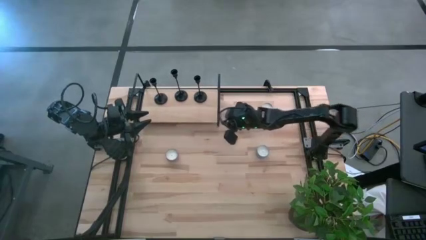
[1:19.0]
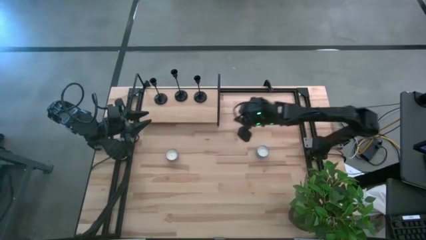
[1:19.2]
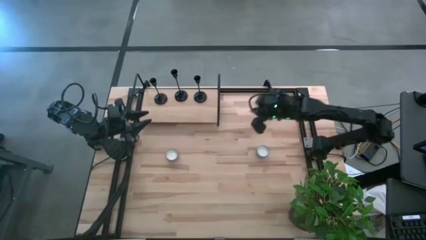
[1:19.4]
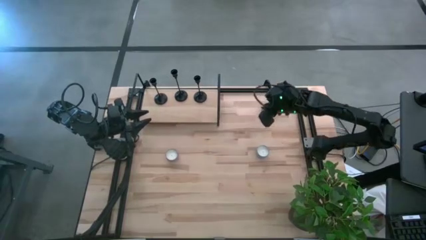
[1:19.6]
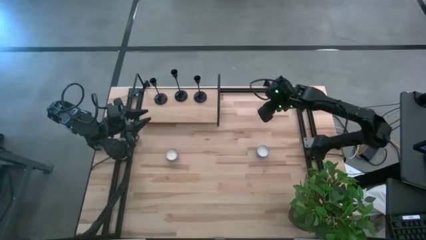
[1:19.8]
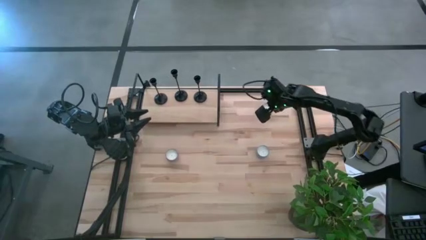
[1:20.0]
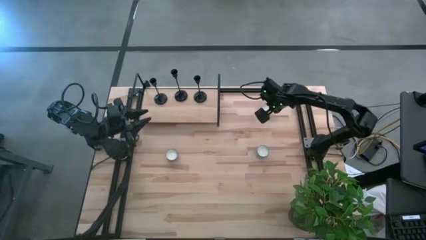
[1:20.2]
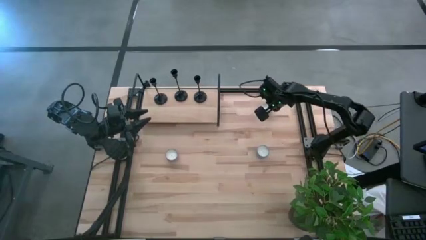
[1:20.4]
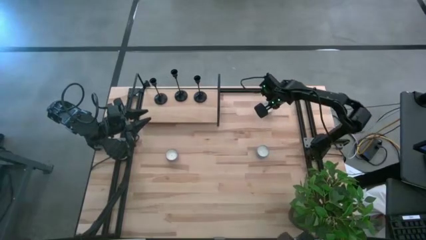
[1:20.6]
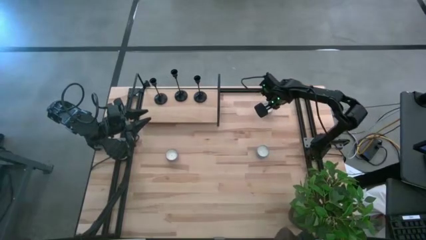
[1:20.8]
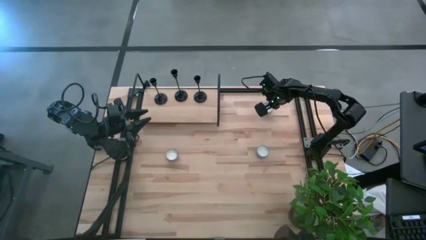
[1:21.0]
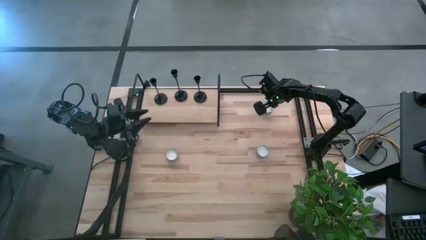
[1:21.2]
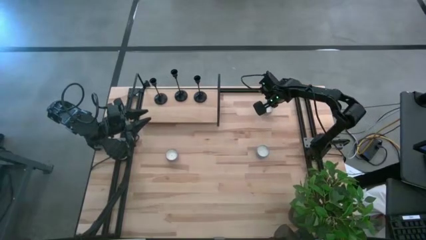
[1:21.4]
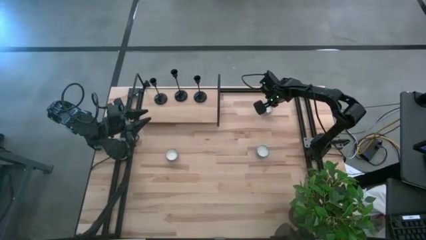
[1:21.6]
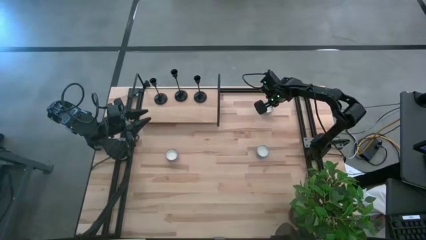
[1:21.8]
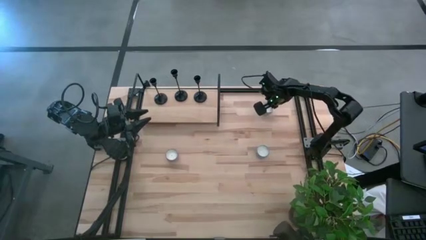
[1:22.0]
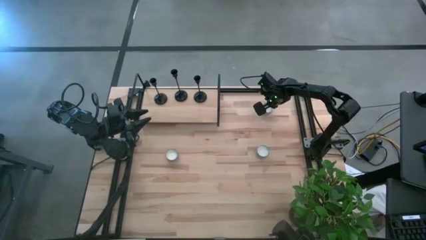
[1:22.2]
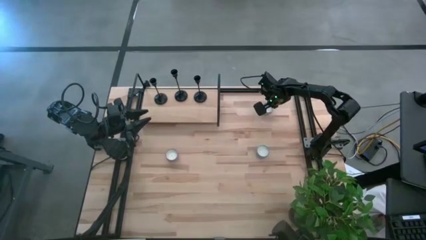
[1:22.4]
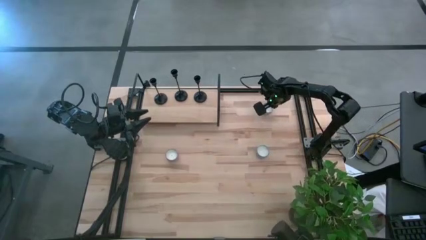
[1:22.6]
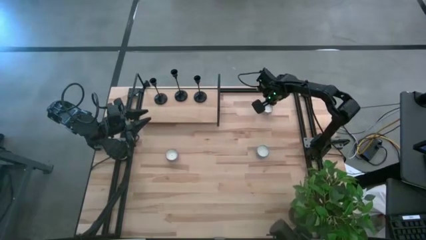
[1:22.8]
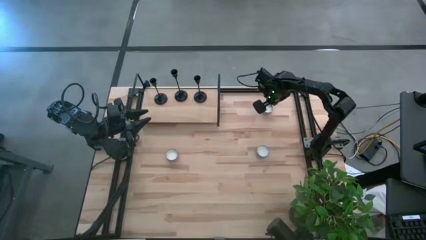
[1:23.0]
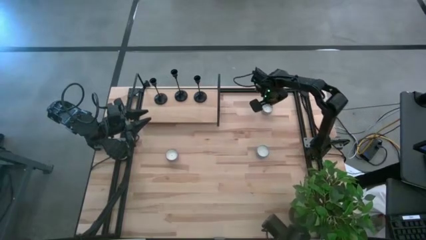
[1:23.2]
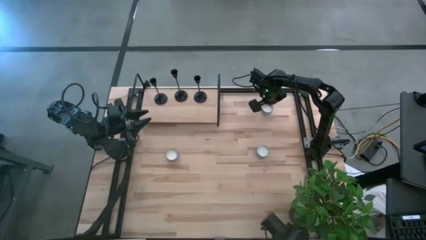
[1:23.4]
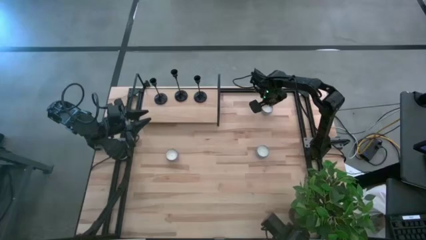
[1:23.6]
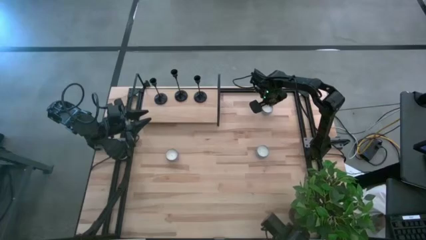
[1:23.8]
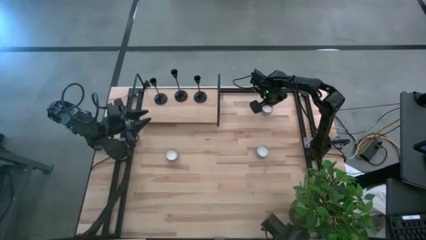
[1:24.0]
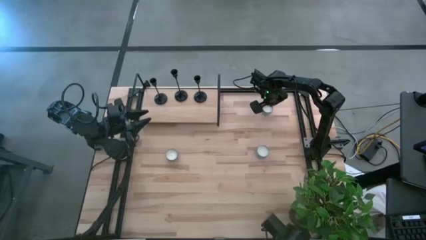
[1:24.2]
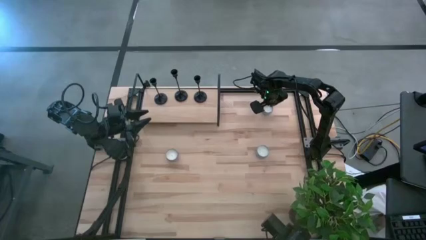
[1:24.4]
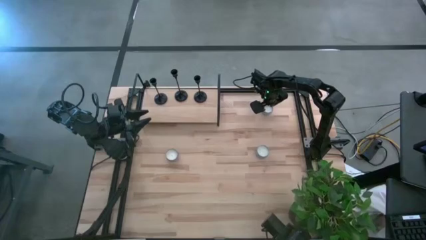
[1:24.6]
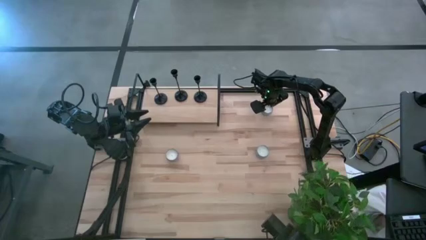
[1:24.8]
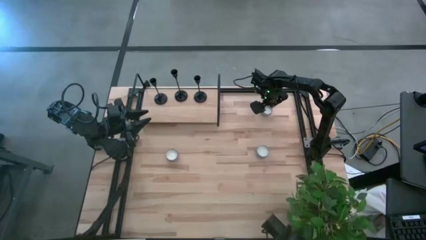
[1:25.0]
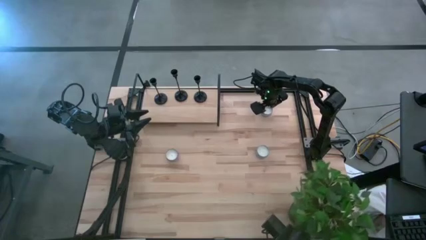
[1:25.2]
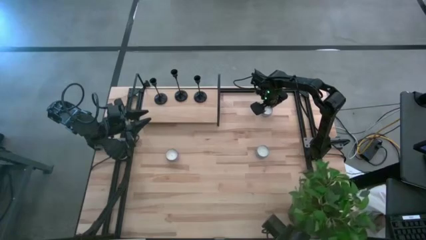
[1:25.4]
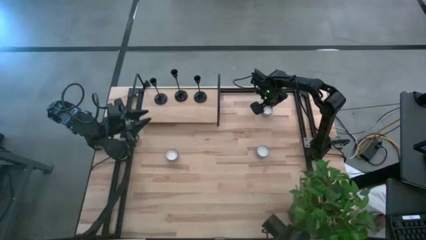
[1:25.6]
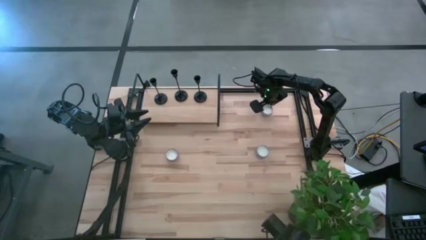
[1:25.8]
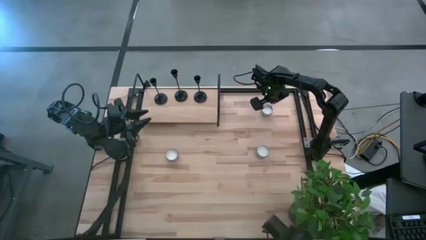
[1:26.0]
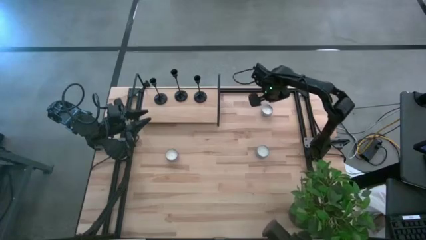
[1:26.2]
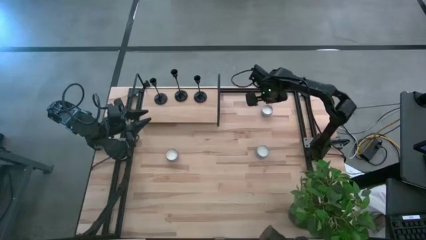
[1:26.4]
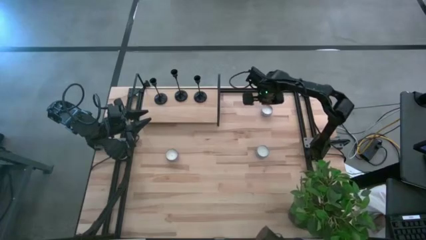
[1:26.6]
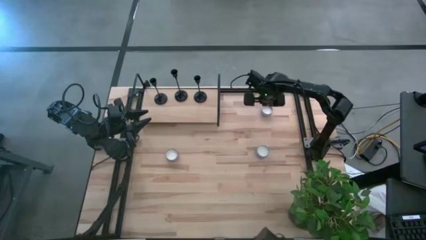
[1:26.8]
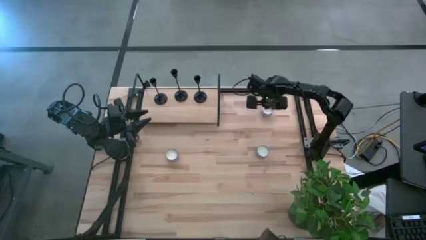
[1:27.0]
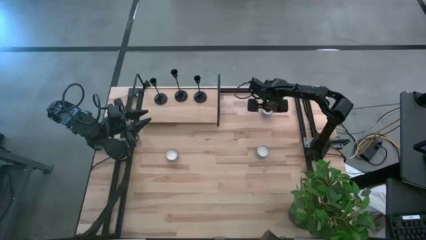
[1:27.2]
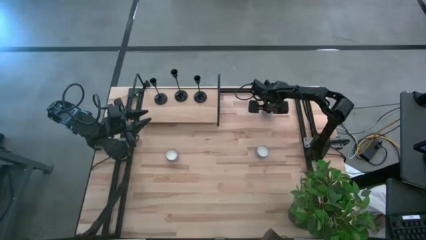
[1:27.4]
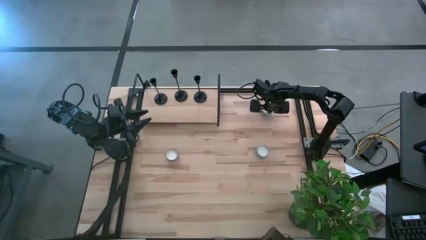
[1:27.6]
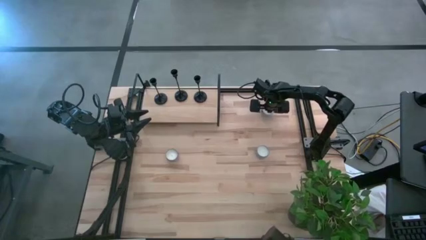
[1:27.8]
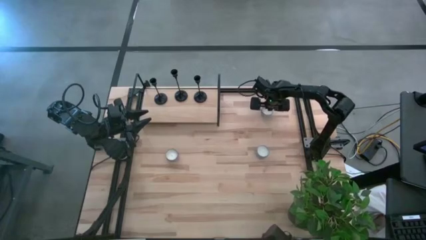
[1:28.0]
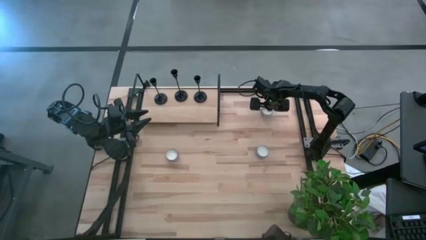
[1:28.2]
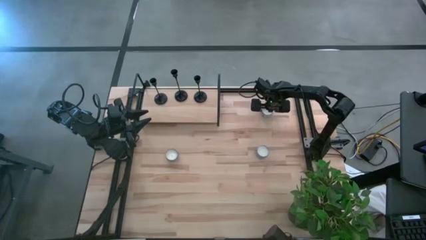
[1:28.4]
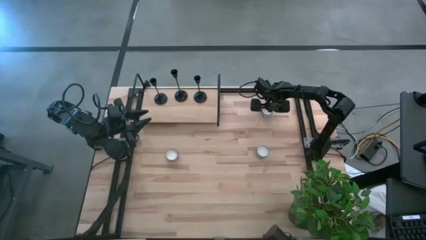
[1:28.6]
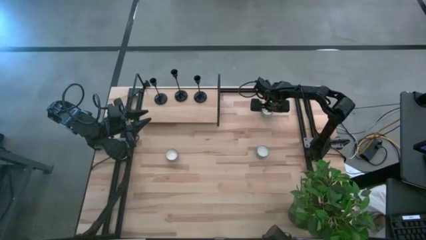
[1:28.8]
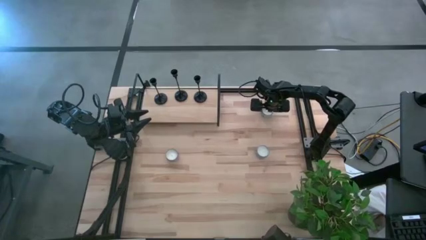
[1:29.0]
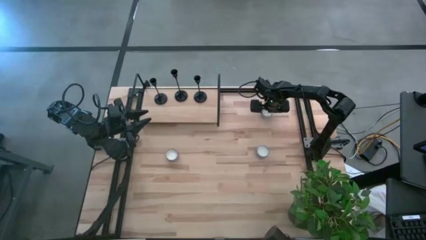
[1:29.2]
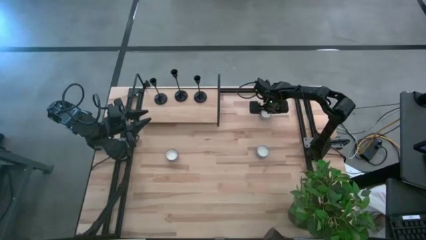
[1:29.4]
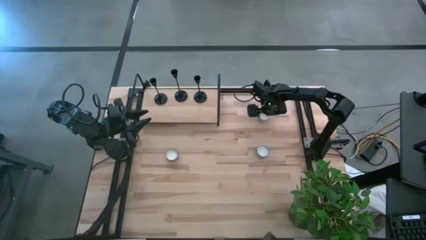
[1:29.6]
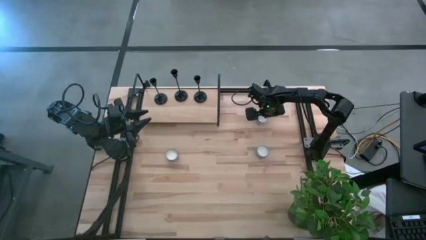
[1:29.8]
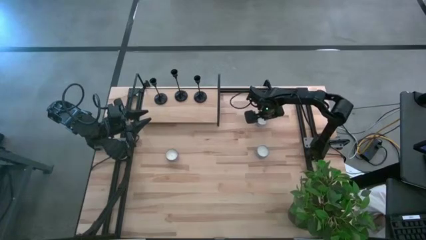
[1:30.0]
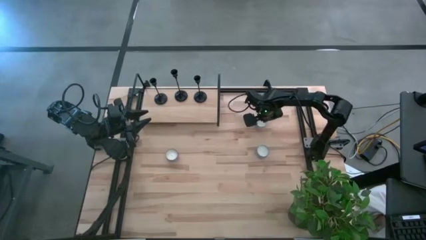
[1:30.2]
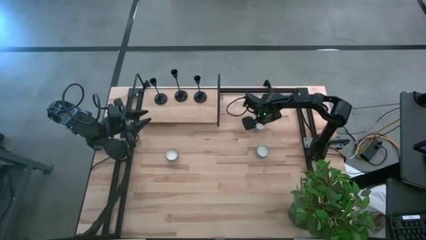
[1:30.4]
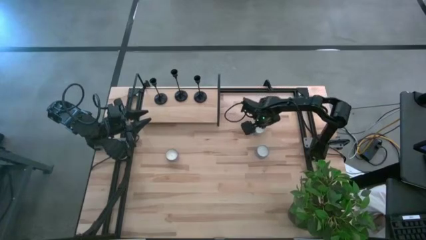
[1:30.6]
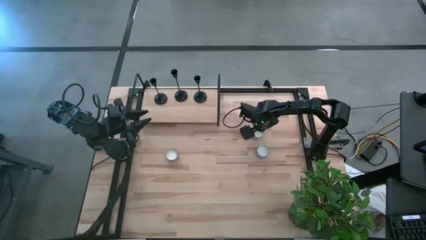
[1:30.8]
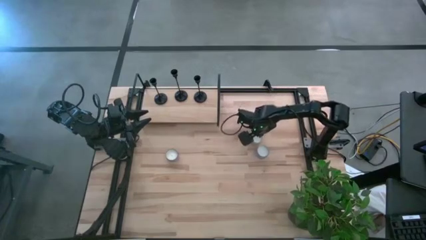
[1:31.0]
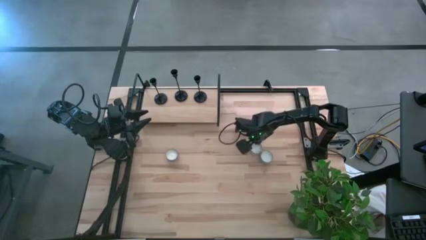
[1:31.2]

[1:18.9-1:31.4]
Task: Pick & Place candle stick holders
Move the white scented candle to the center of the table

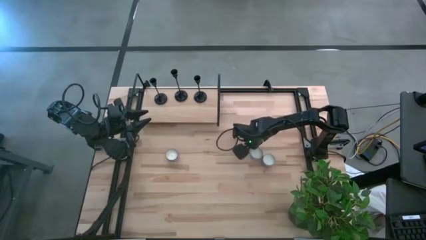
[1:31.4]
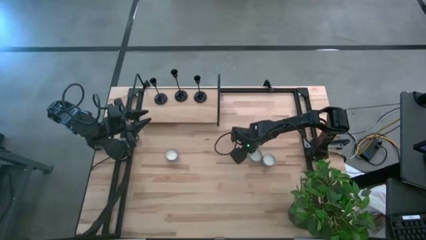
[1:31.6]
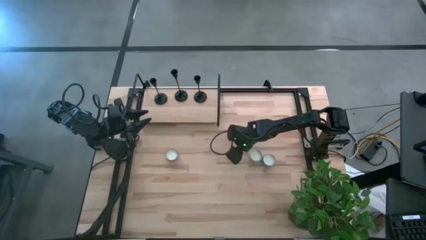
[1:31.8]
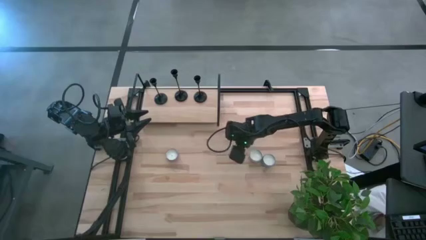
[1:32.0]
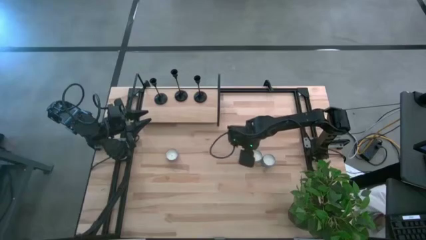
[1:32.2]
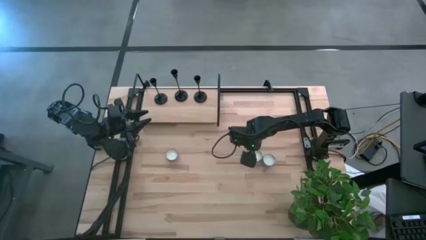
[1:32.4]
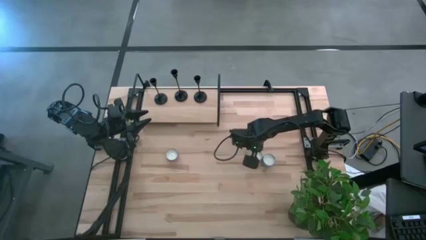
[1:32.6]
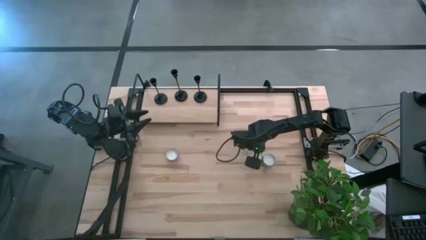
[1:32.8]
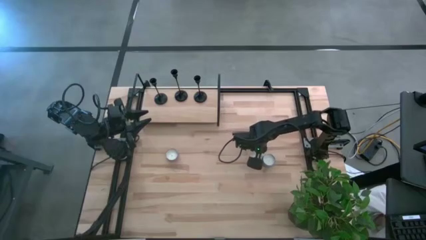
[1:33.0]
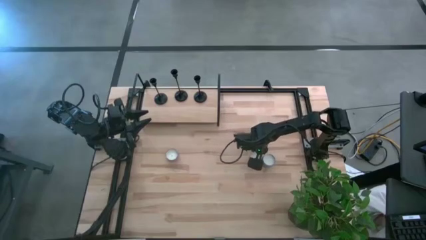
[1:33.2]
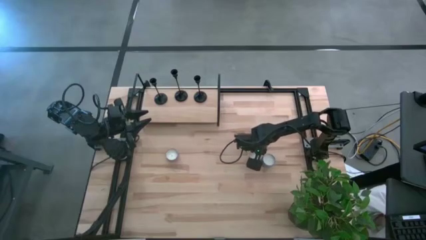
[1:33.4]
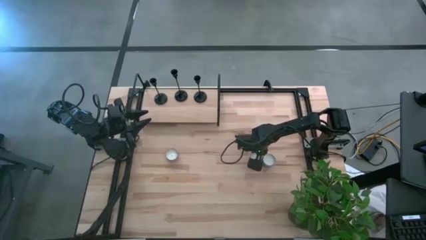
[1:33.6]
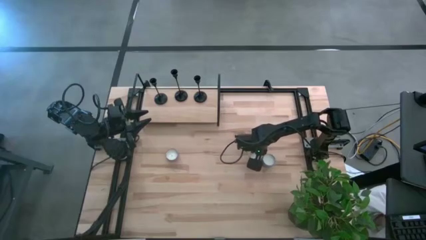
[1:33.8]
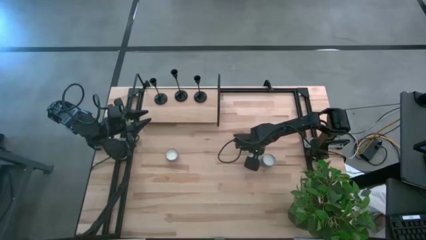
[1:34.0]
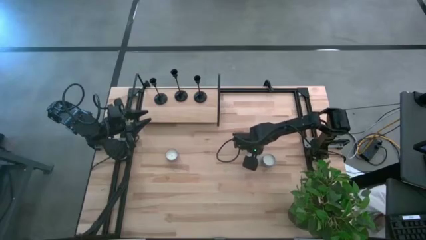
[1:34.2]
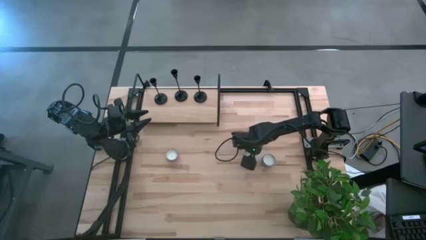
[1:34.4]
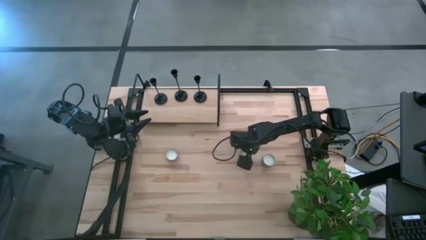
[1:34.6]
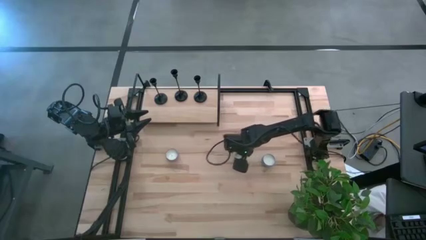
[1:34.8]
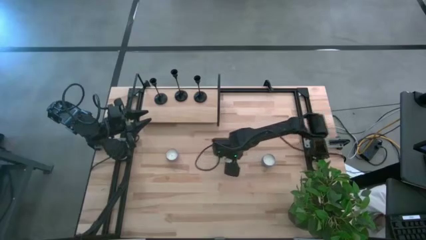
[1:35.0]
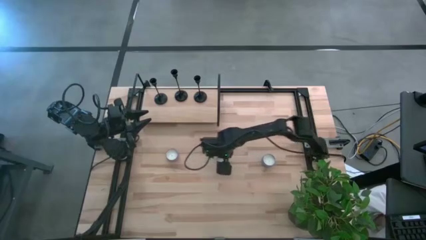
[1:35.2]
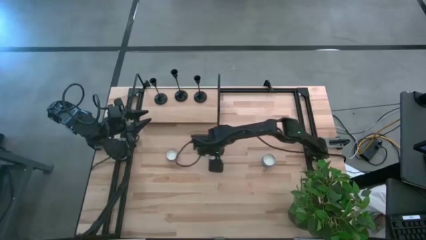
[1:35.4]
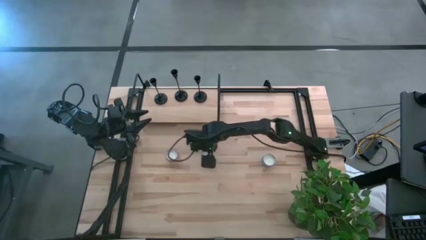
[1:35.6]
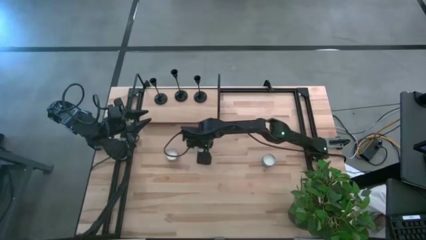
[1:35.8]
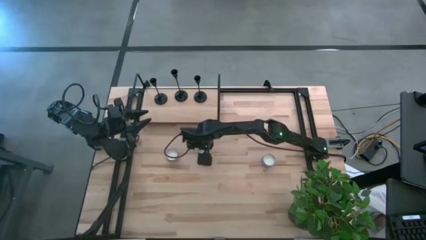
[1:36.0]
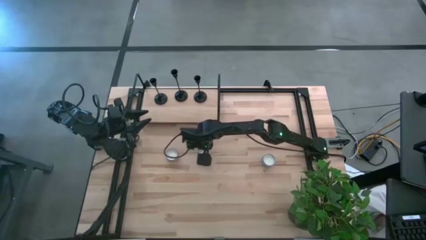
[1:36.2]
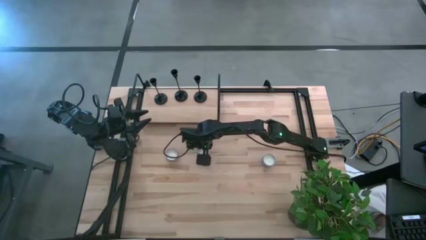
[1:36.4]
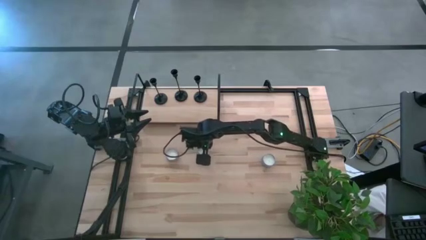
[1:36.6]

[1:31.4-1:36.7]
Move the white scented candle to the center of the table
